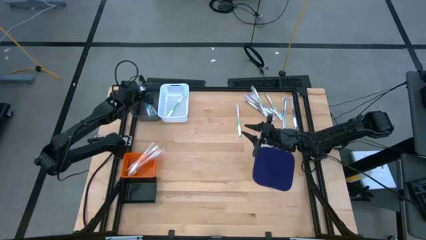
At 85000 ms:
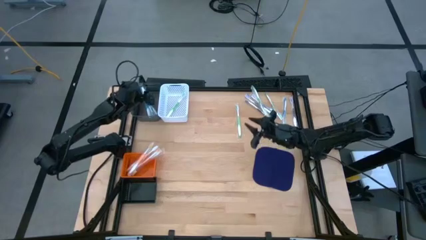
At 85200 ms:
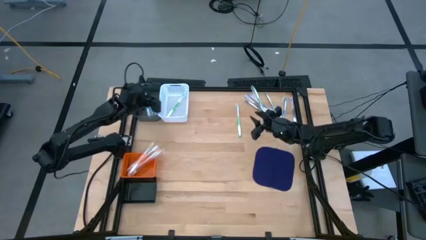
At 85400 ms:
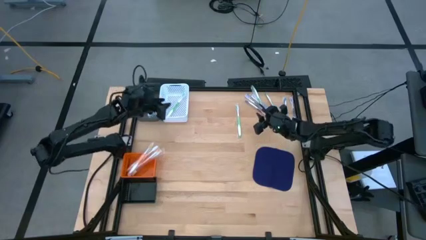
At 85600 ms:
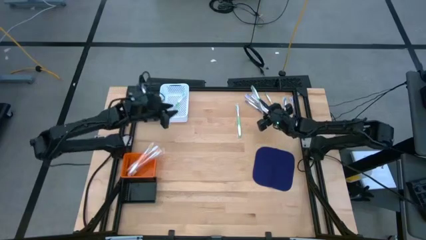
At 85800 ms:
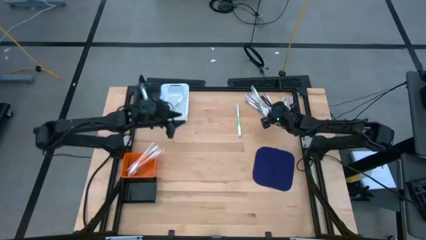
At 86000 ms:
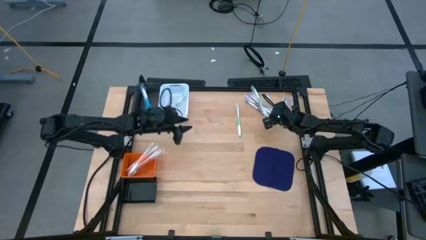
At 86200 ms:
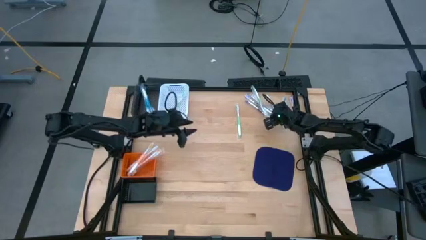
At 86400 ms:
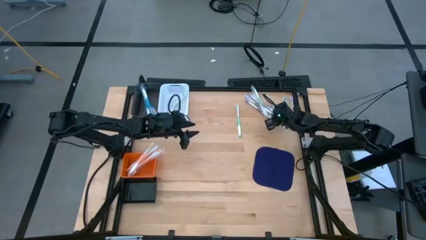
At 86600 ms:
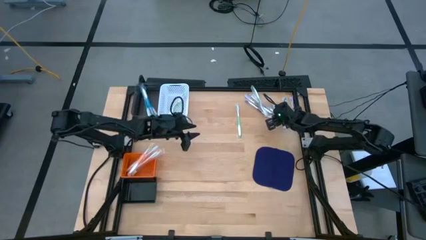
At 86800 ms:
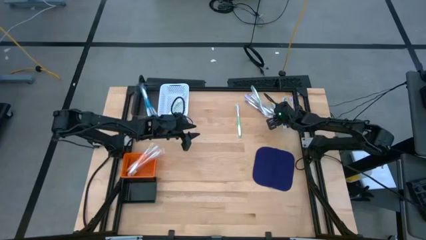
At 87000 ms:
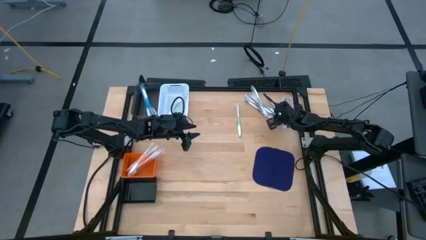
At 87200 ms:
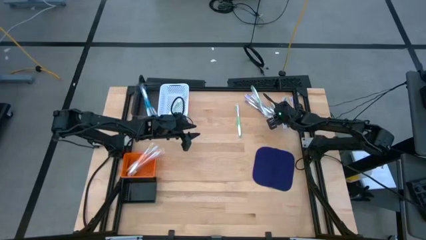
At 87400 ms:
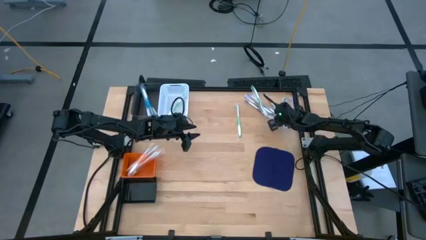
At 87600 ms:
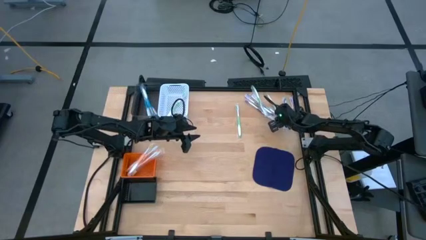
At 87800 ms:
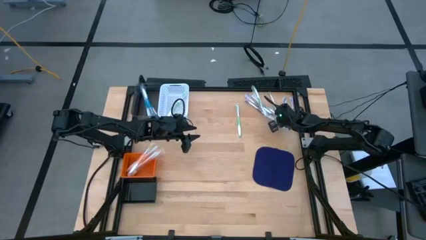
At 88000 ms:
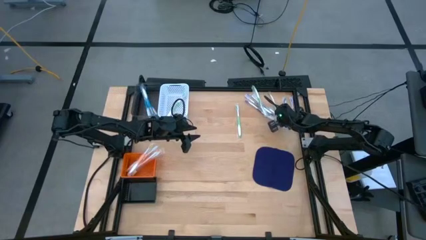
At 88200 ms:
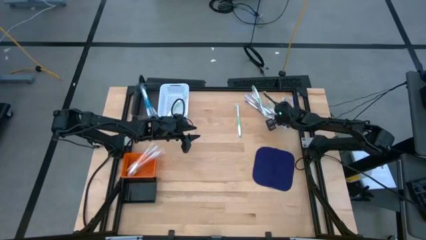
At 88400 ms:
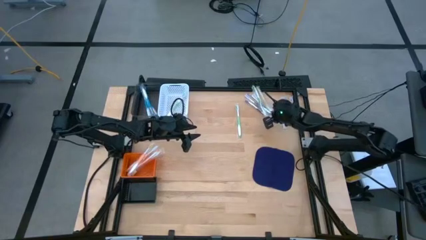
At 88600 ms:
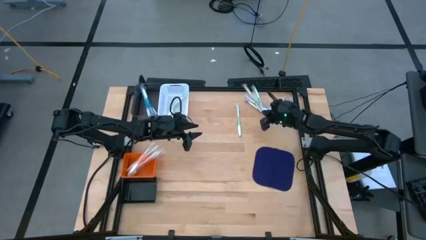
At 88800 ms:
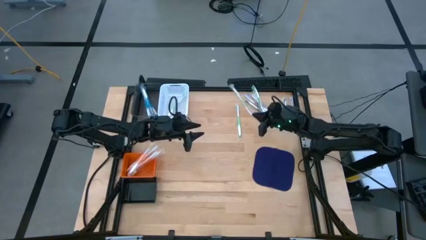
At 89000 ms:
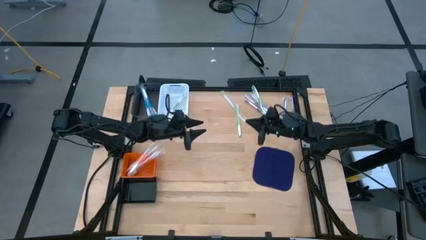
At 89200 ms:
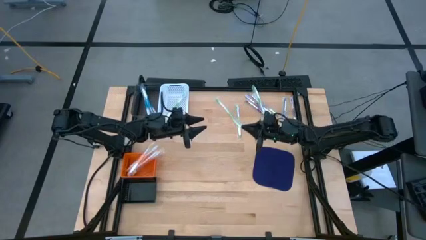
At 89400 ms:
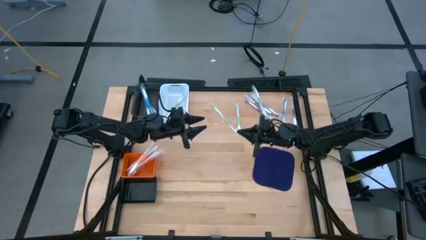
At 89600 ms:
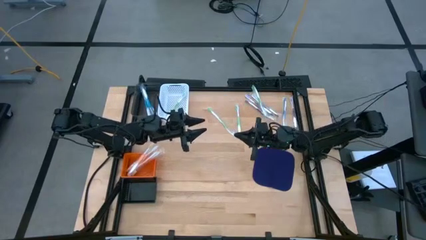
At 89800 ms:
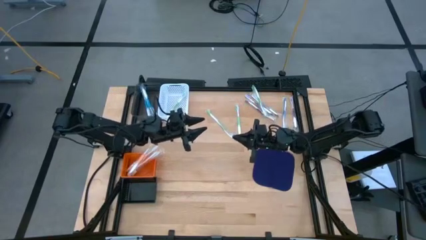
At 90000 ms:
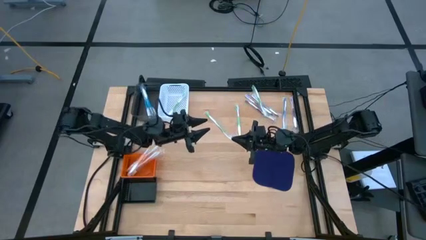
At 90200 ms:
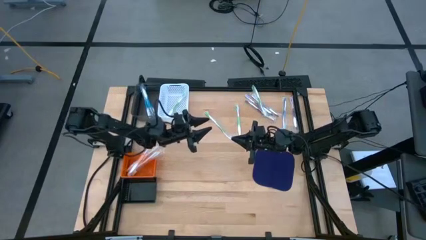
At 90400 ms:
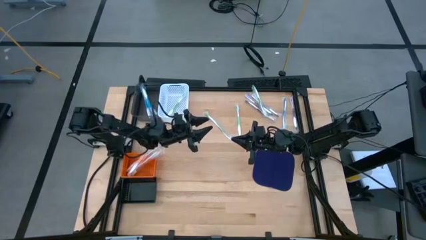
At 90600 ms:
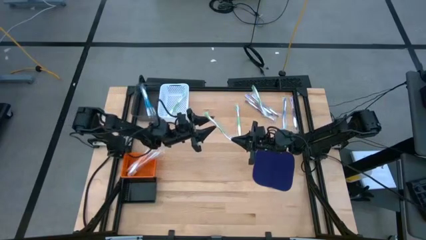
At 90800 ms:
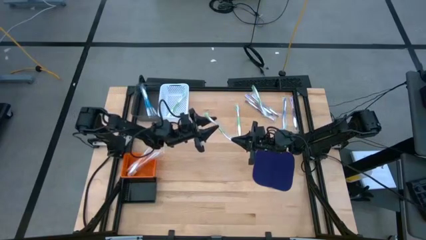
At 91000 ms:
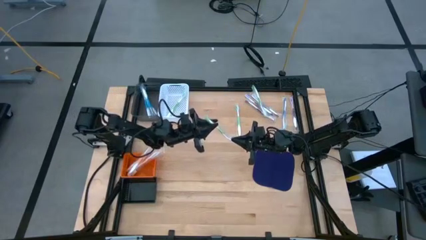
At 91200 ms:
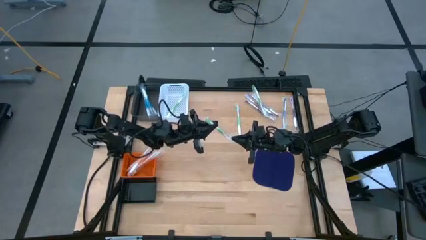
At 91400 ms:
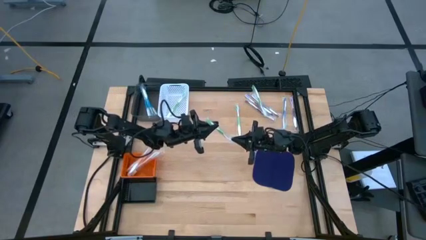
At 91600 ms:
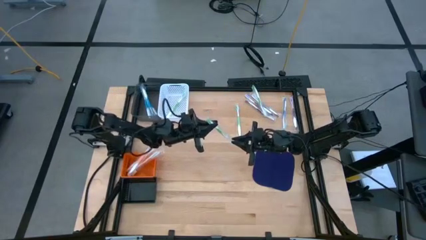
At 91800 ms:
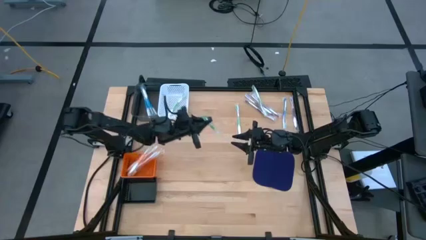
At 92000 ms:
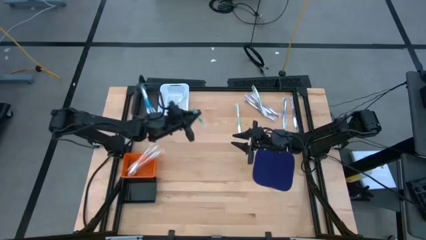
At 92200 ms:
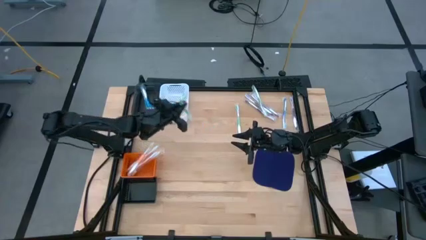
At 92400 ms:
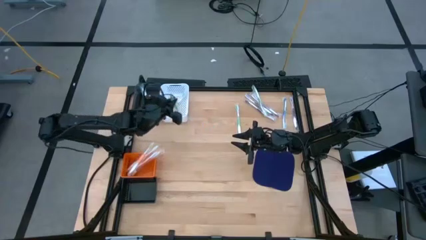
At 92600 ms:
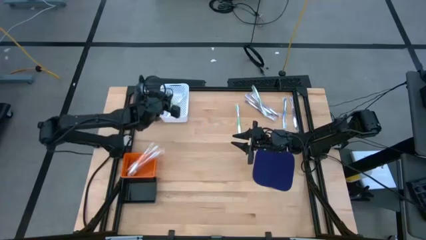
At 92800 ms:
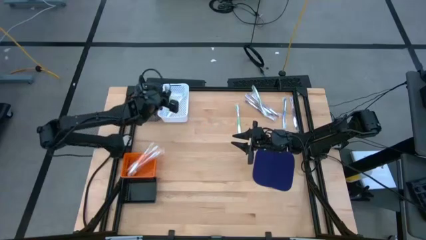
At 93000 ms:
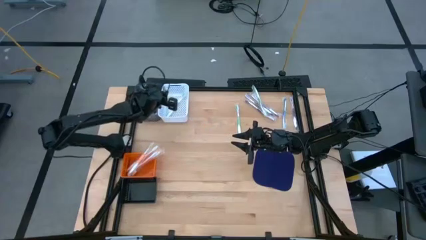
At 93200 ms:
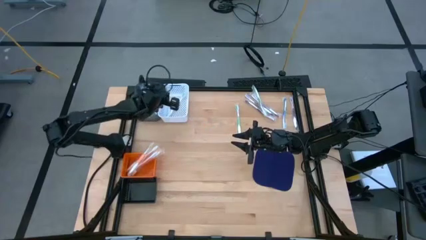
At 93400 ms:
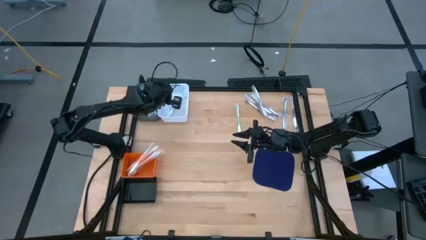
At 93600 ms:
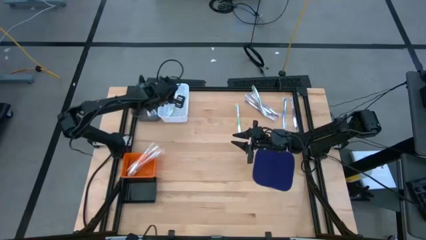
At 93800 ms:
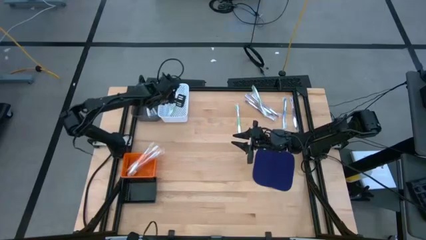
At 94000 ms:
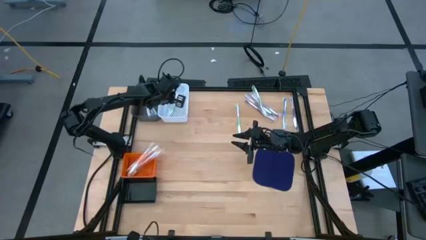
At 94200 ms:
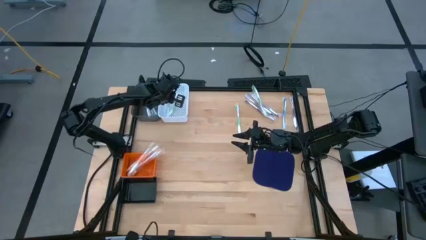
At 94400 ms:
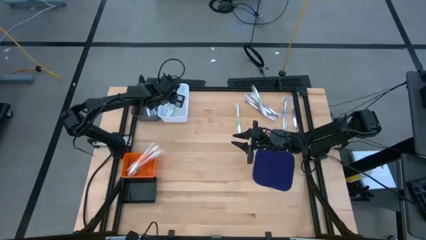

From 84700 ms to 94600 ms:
Task: Pick & Place Toothbrushes
Put the green toothbrush into the white bin

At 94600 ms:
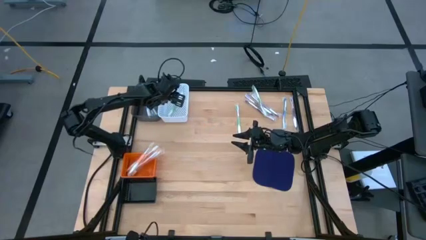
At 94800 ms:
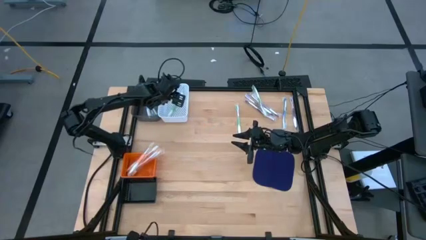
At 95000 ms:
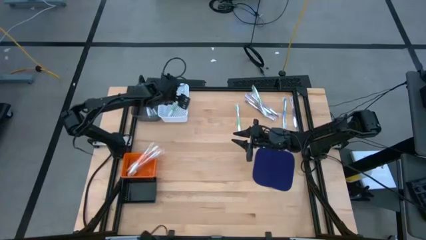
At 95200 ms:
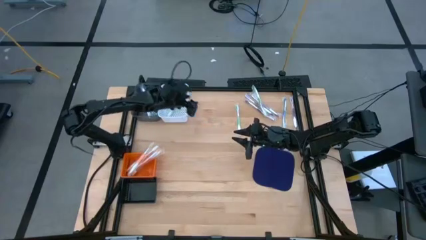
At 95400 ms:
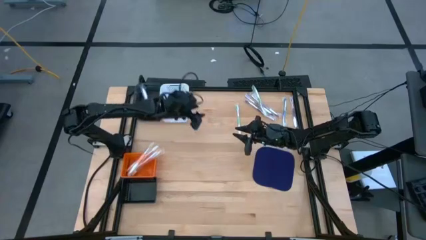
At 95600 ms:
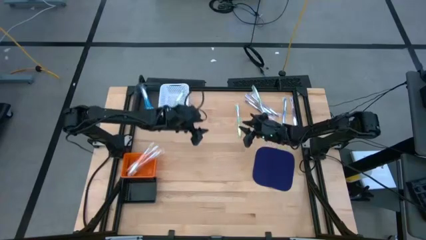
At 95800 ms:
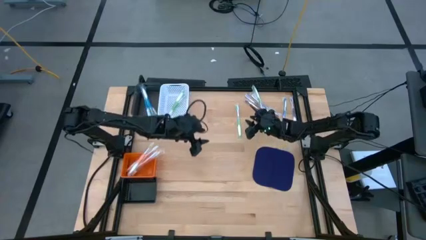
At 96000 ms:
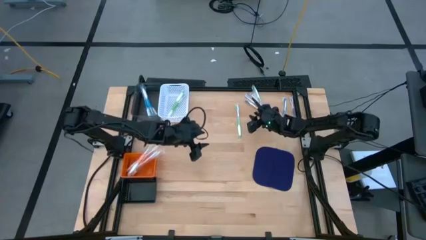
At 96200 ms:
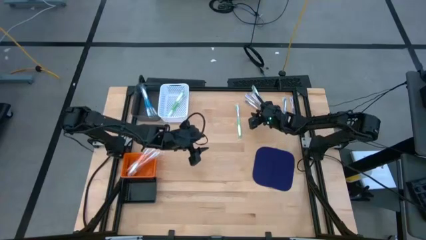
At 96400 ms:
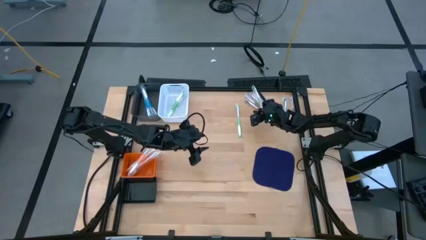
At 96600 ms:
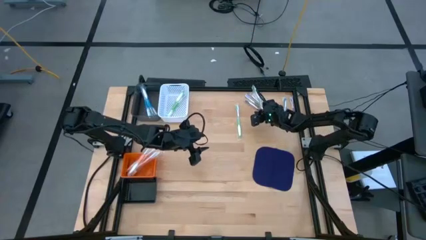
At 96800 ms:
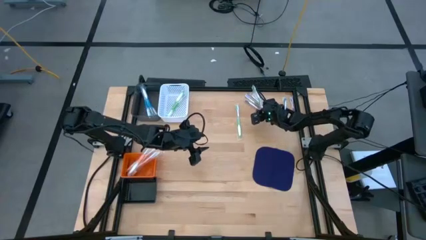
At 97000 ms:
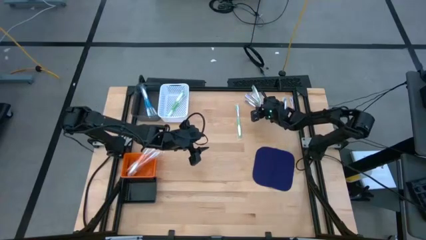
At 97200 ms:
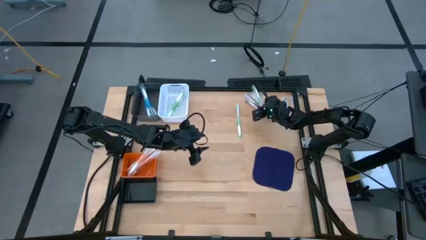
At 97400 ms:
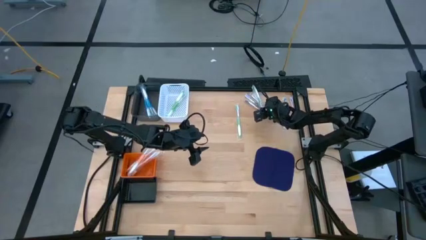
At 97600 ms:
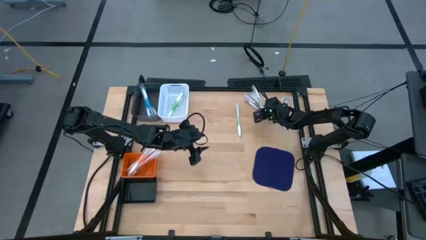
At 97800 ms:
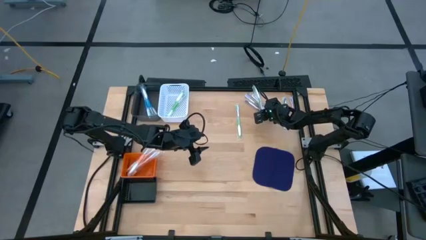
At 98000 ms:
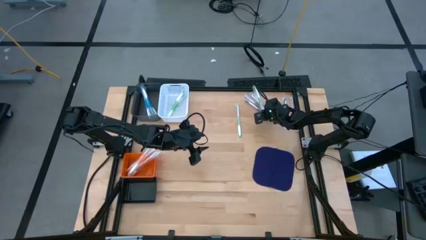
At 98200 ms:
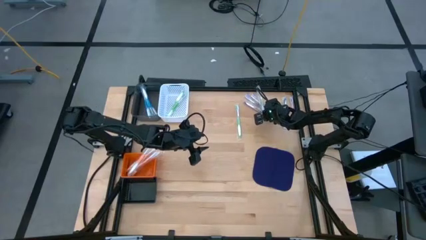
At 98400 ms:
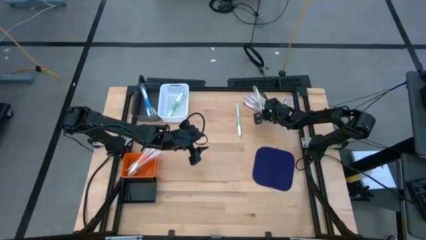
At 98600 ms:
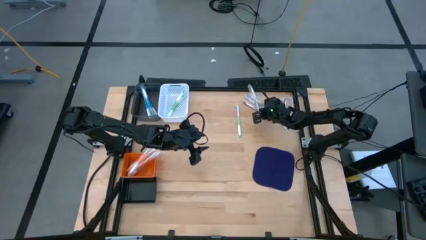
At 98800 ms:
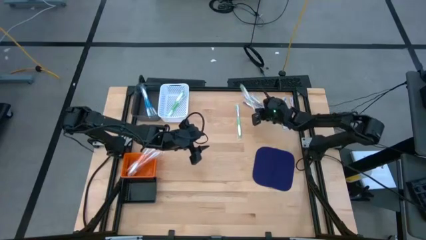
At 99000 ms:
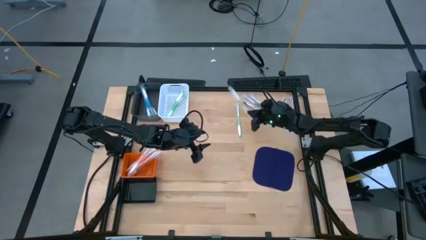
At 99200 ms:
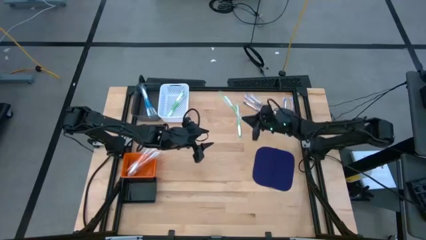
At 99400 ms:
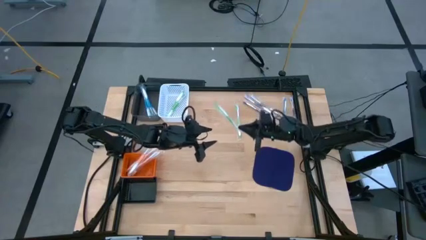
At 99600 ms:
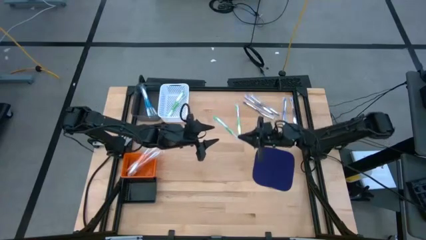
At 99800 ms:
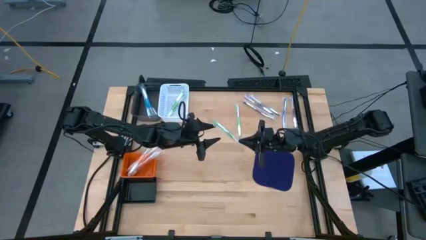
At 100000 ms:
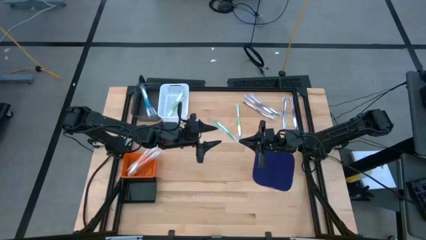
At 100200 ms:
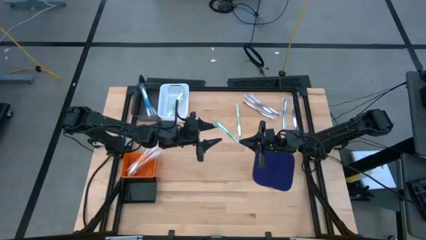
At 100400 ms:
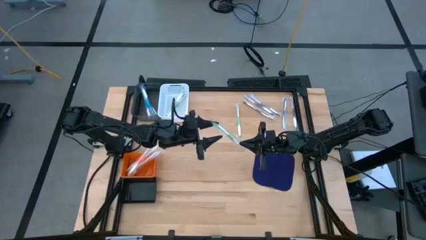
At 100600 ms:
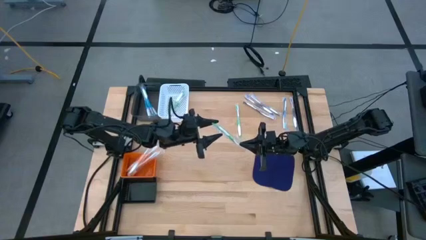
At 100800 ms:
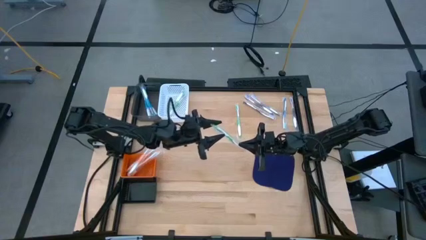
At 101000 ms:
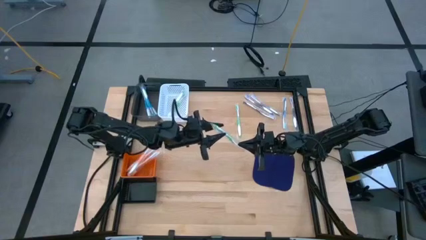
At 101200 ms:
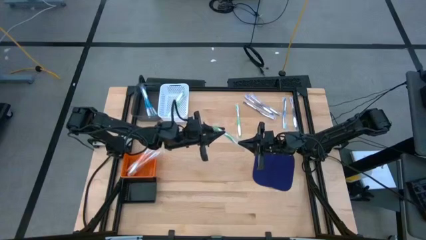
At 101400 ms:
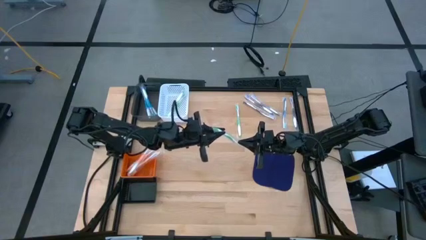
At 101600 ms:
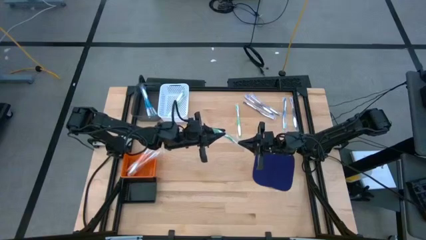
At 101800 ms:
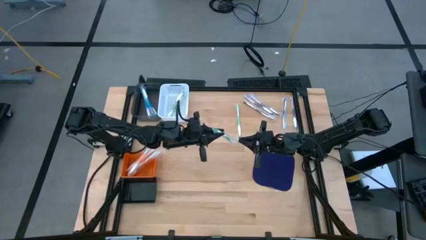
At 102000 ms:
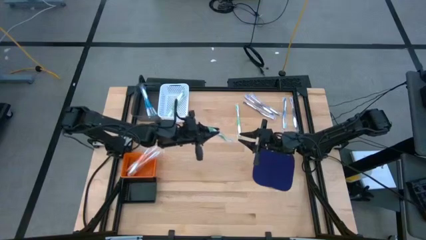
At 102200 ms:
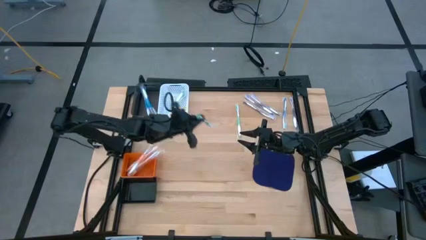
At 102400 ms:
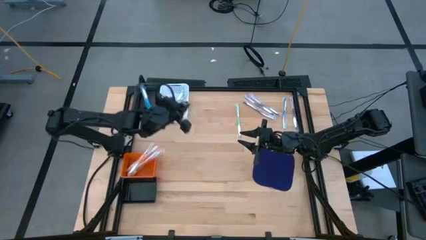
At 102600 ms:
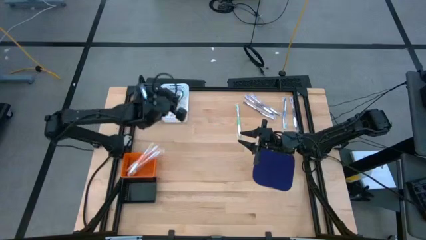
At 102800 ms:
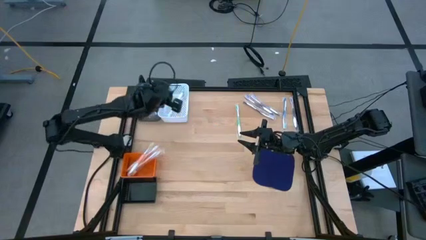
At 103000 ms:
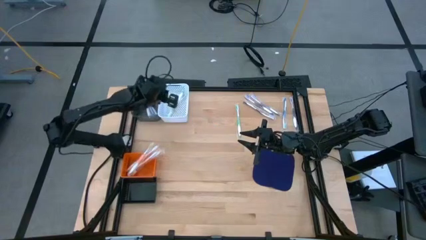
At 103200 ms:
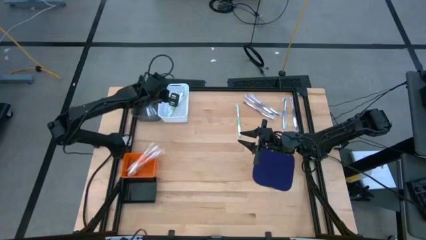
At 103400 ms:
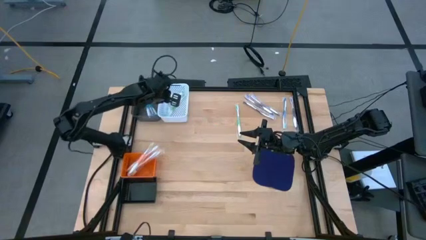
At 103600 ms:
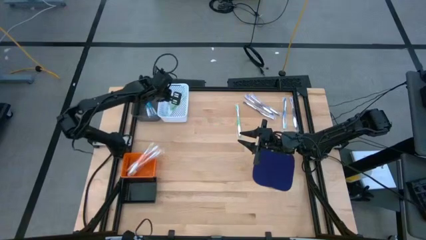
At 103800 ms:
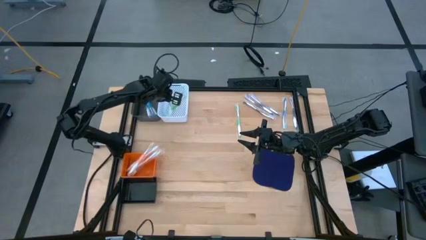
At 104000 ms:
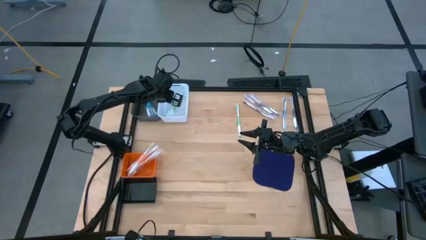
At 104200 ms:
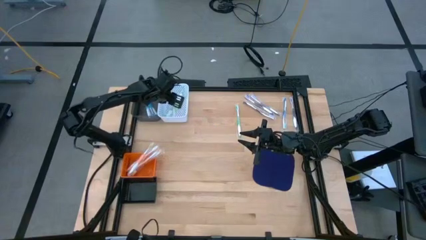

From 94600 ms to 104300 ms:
Put the green toothbrush into the white bin
